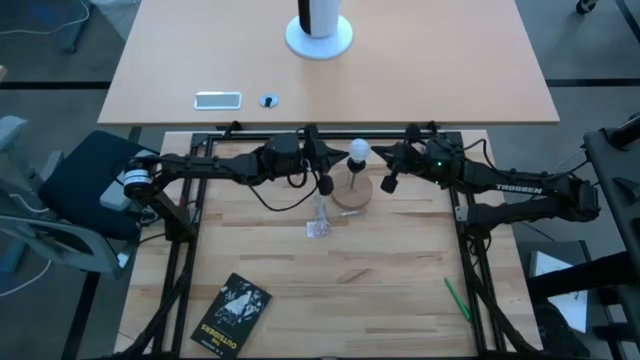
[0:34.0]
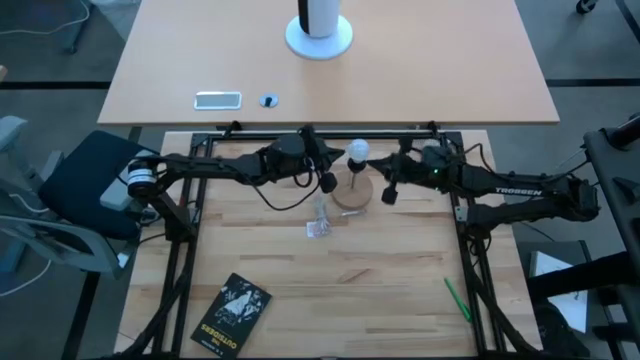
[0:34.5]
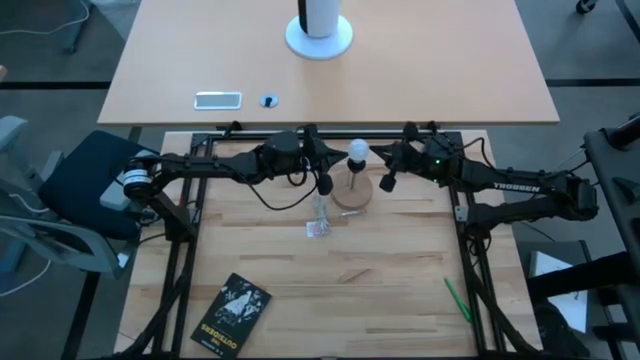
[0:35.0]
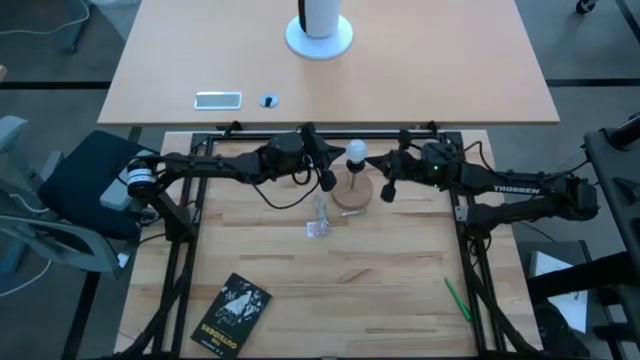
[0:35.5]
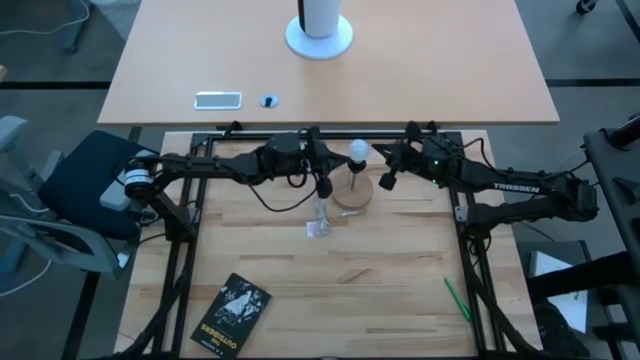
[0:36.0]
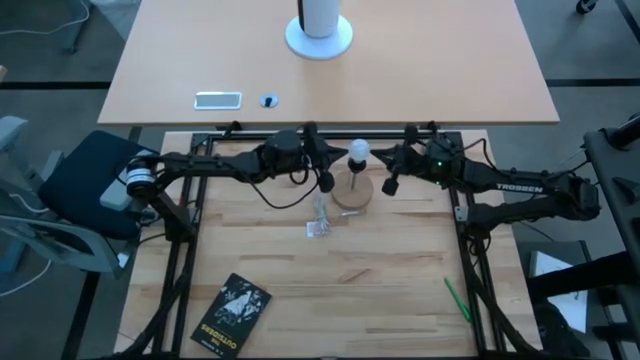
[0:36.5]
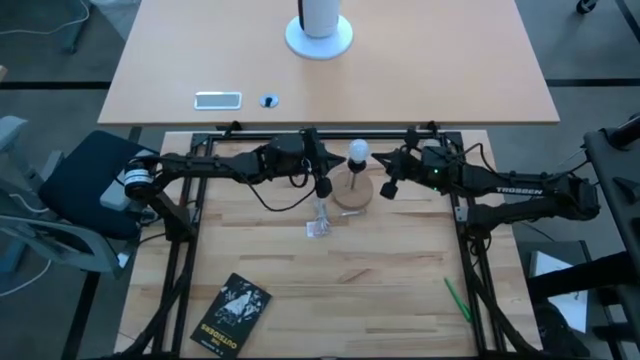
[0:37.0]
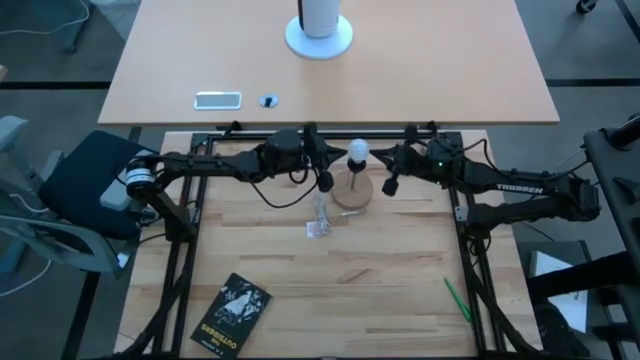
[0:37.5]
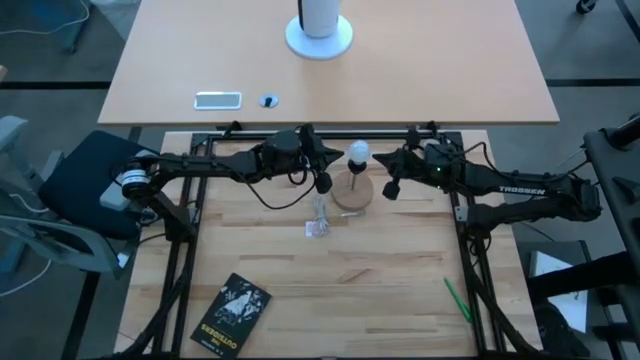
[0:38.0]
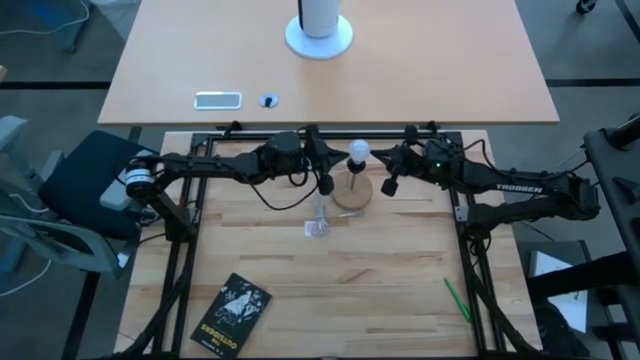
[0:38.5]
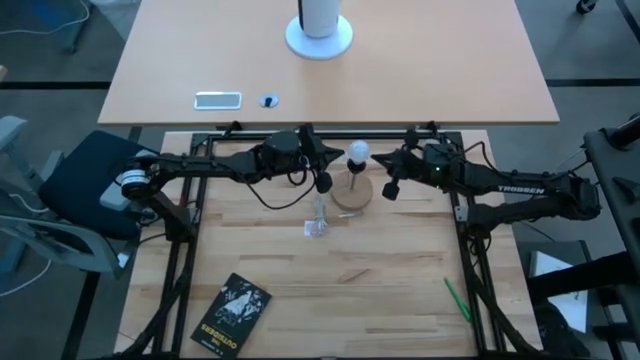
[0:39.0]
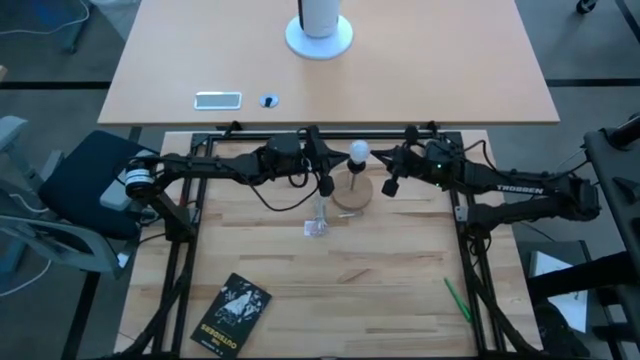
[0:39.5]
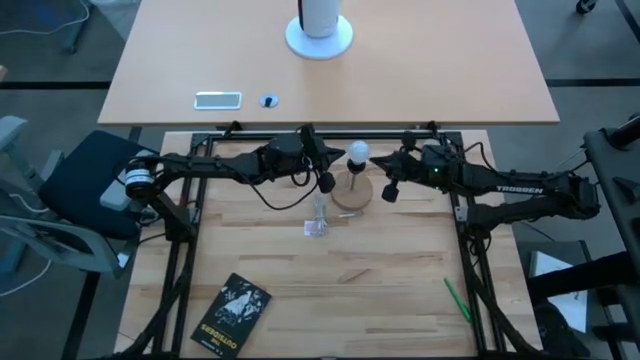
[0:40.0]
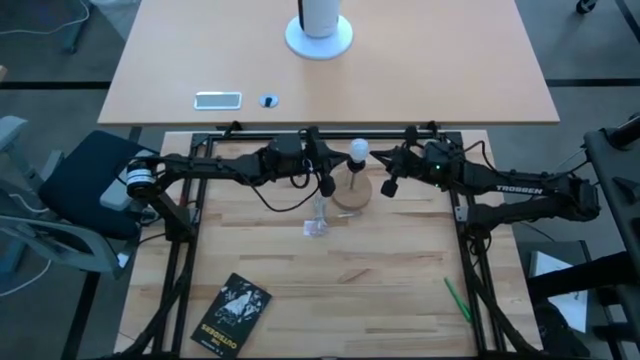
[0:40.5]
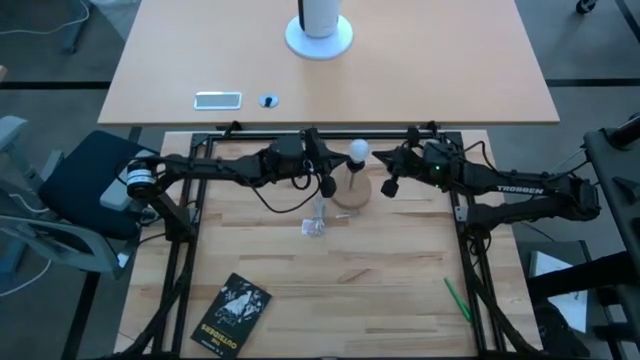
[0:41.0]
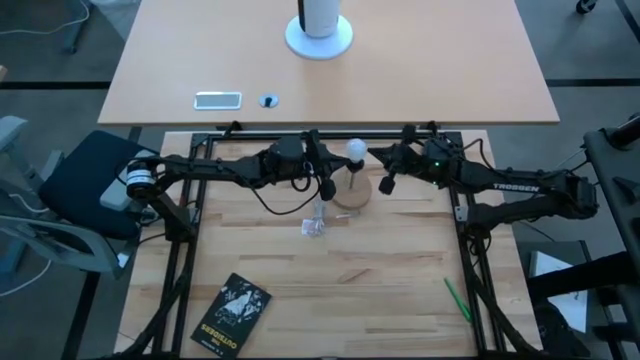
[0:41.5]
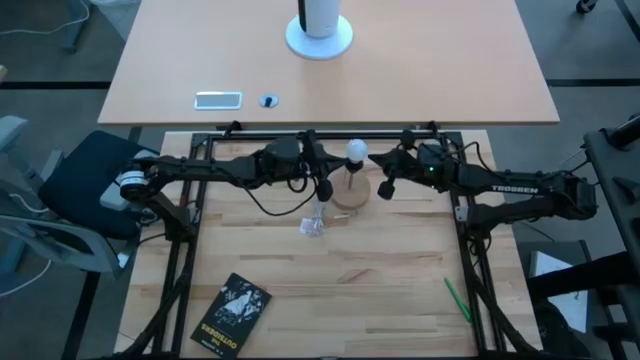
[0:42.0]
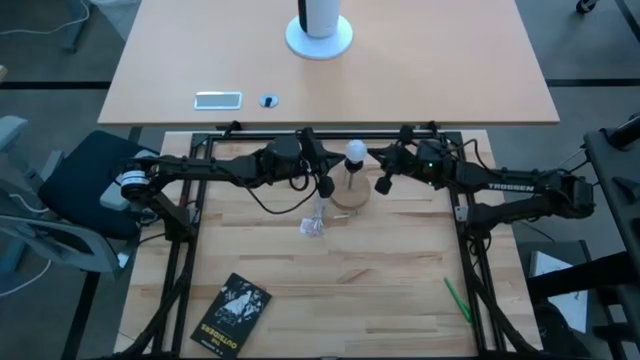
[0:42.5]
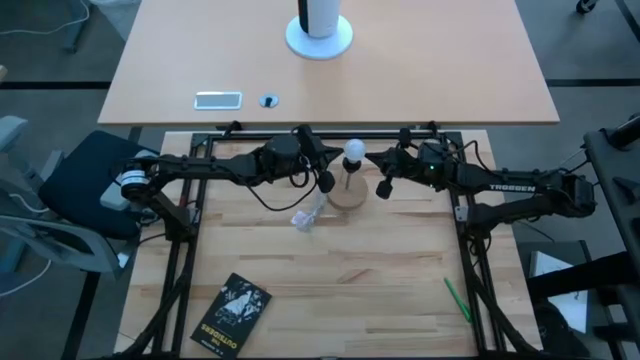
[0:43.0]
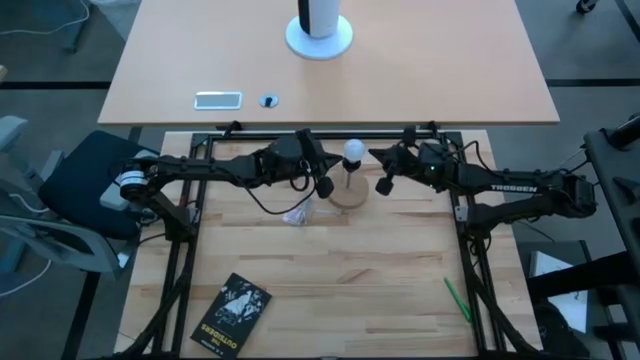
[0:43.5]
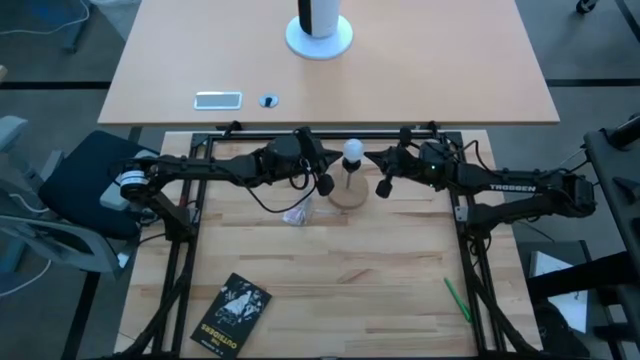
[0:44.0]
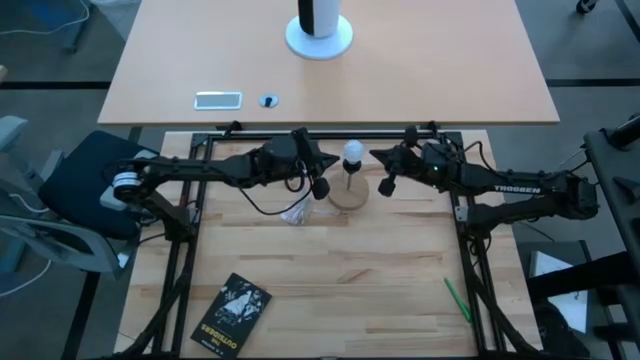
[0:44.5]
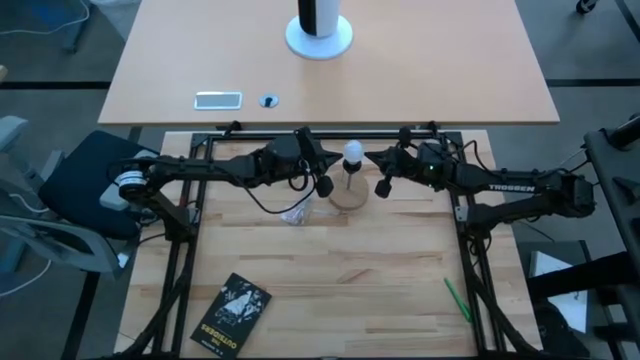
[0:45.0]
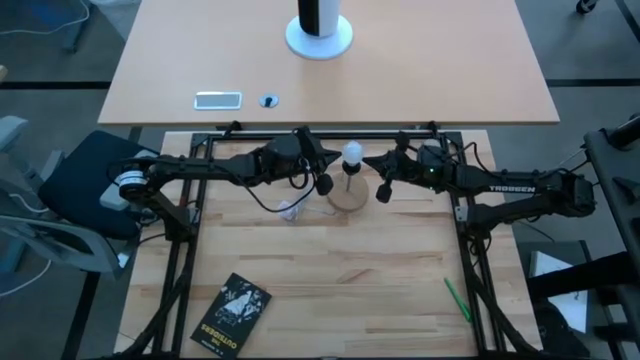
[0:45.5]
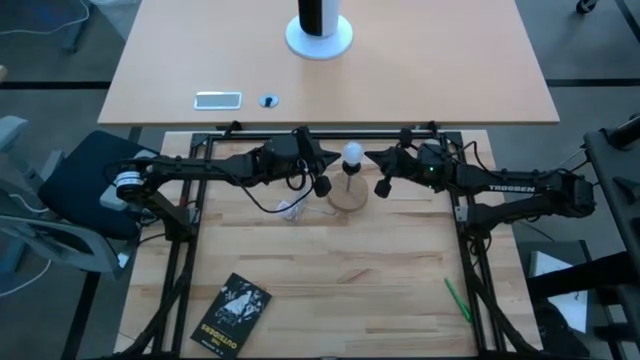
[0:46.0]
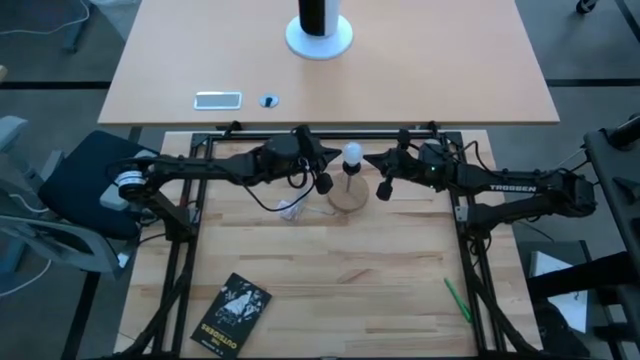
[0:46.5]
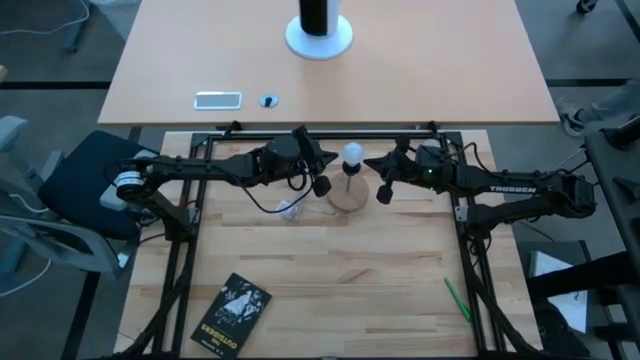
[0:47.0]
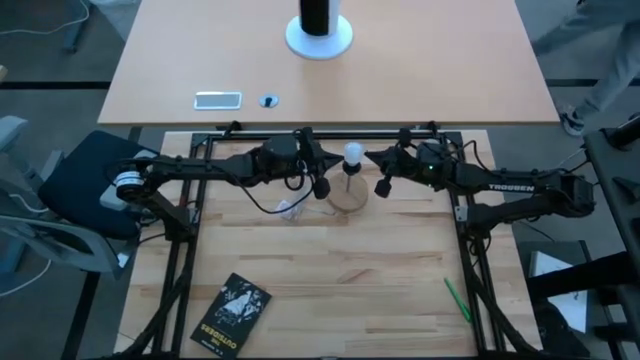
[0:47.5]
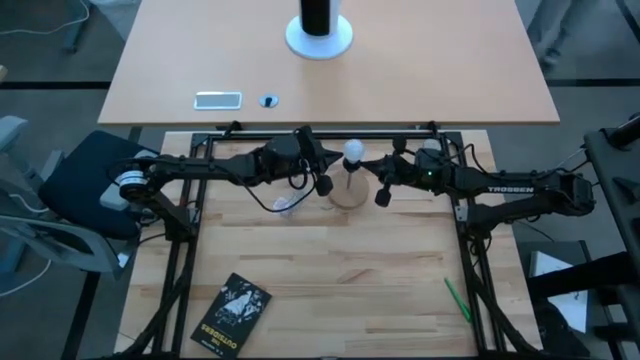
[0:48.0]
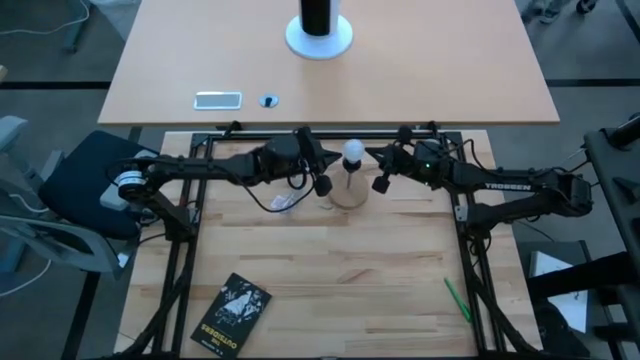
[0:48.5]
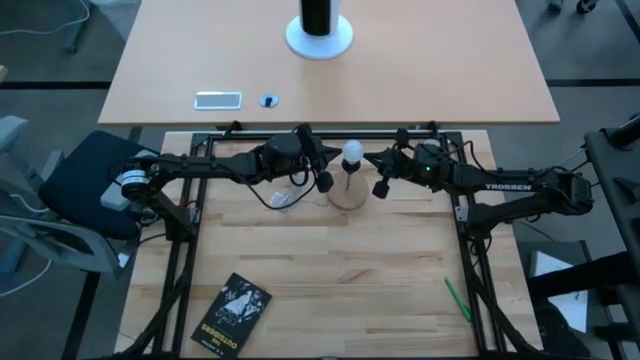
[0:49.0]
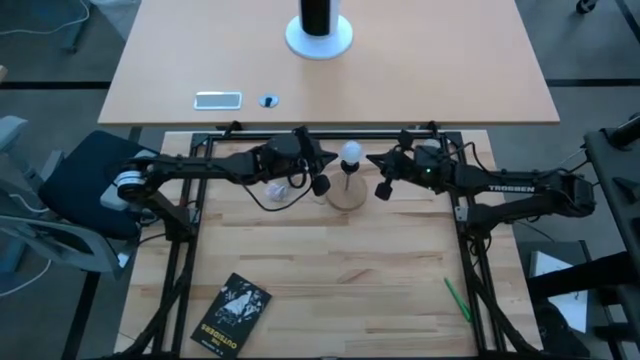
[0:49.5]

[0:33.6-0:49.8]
Task: Screw lightbulb
Insert the lightbulb into the lamp

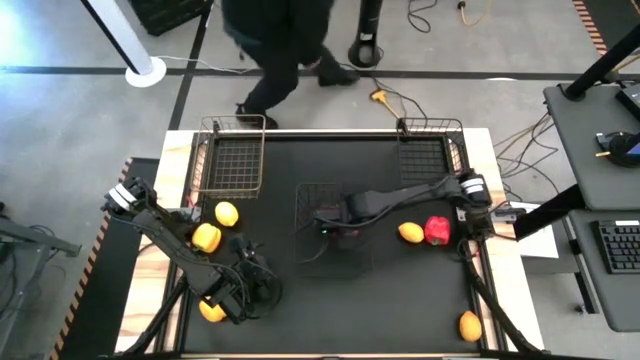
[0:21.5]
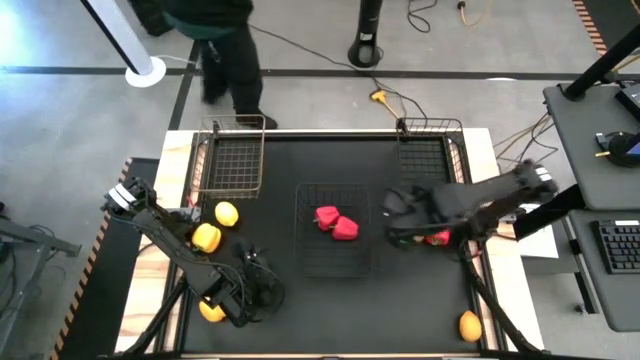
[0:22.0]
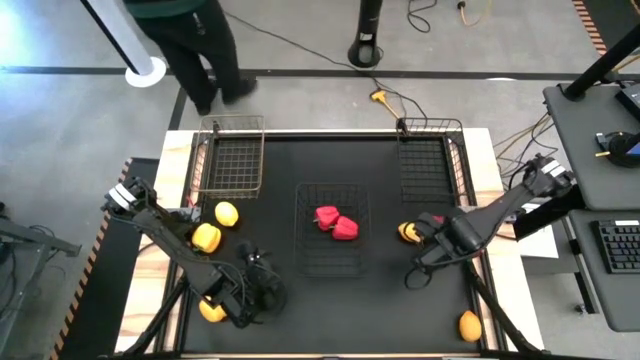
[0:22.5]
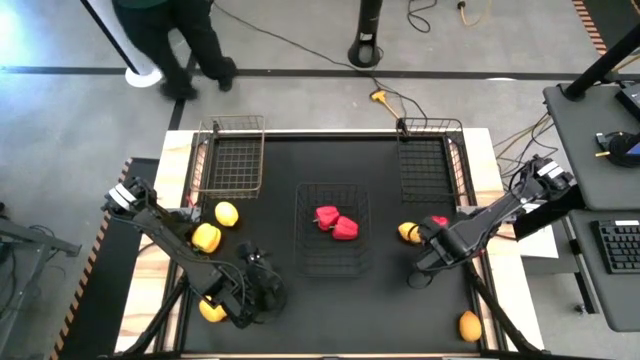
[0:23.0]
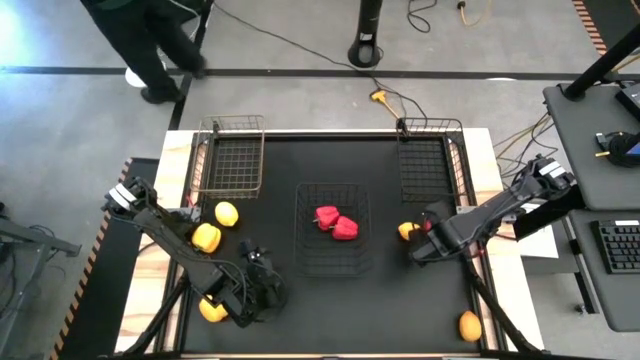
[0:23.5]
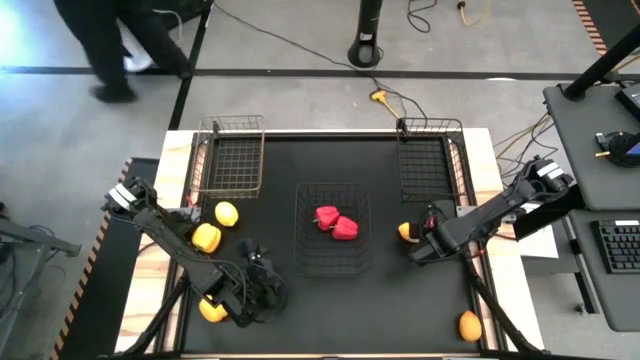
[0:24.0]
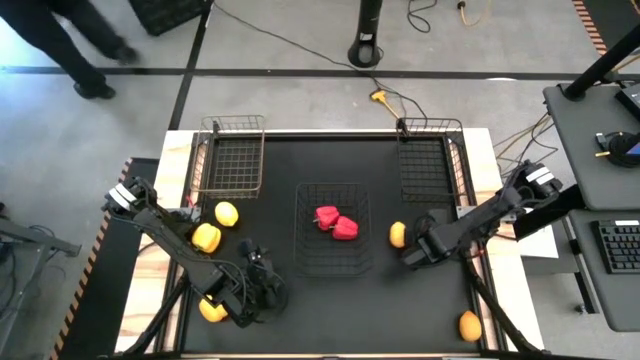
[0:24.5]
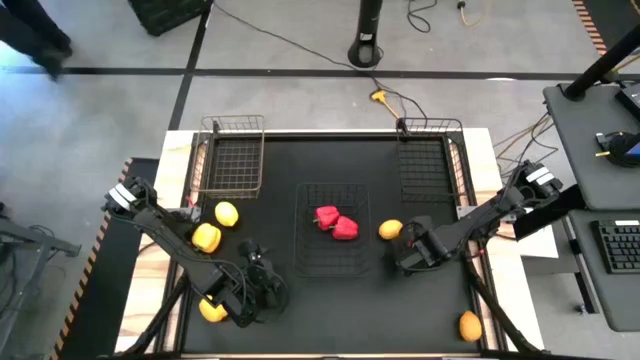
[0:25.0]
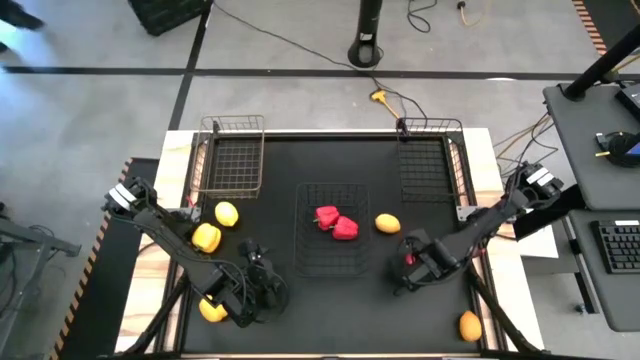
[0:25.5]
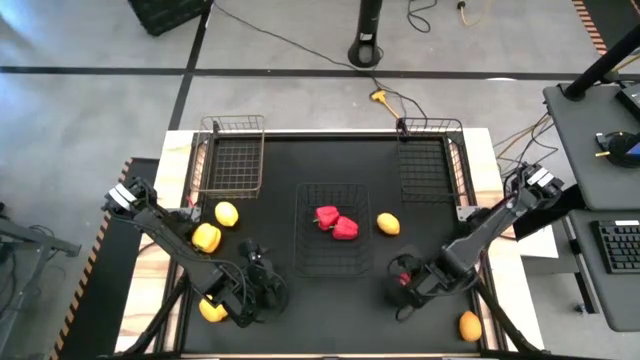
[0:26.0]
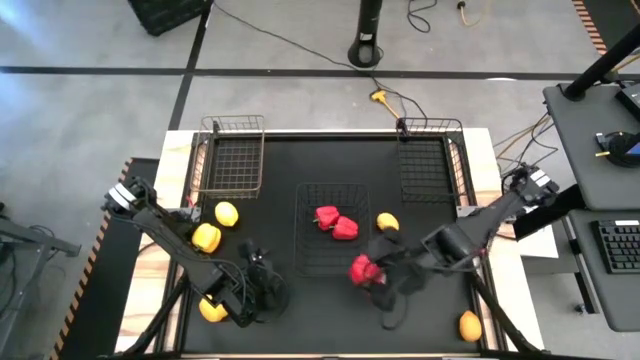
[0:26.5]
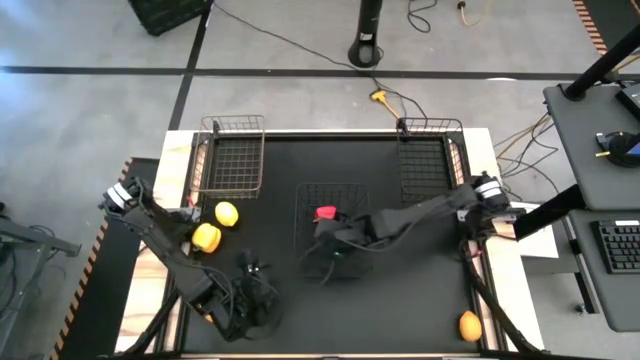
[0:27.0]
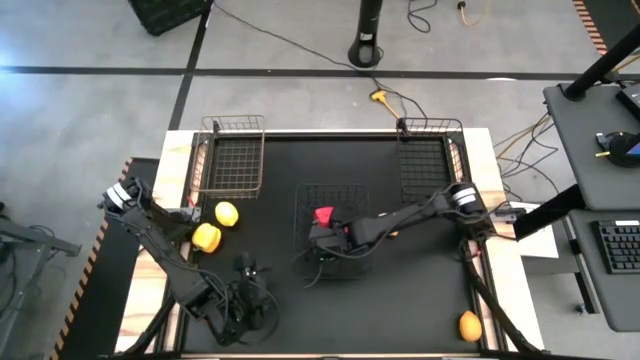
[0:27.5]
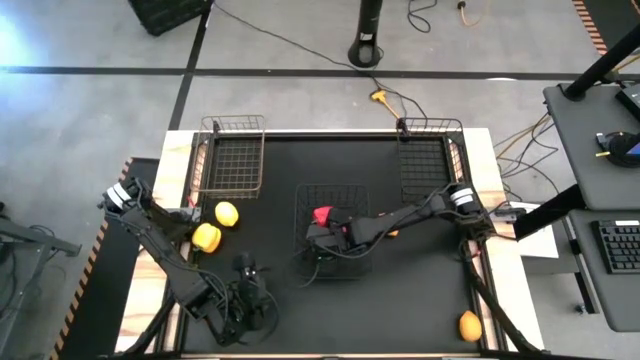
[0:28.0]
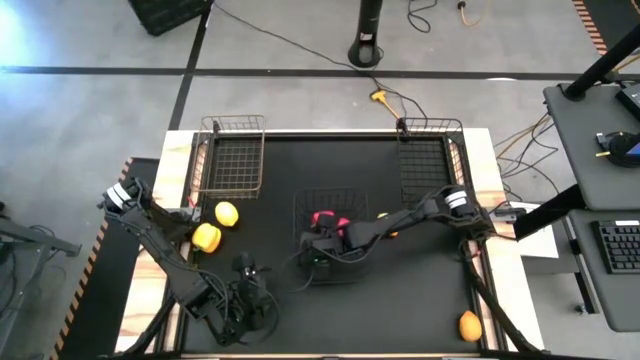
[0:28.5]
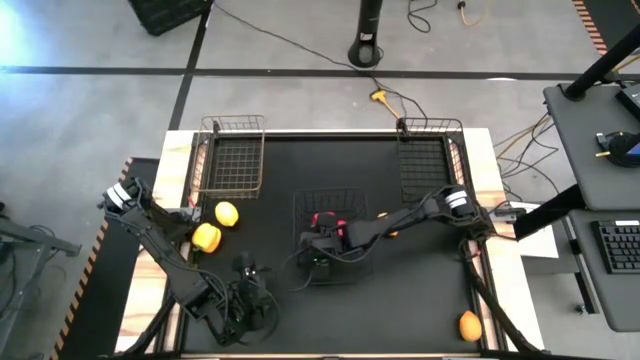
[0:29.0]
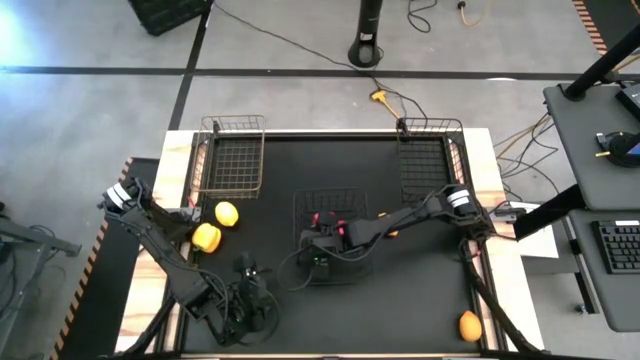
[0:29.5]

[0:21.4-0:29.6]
Task: Sort produce into baskets
Put the red bell pepper into the bottom wire basket
